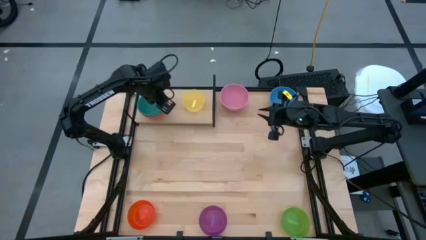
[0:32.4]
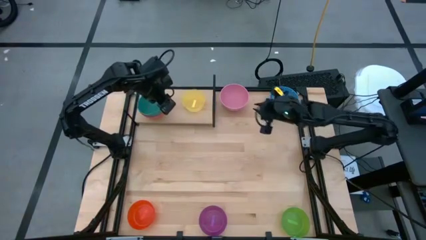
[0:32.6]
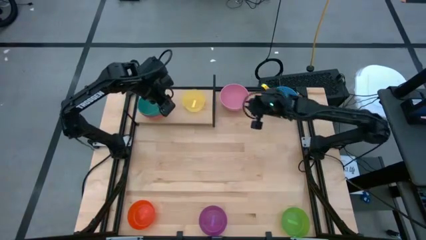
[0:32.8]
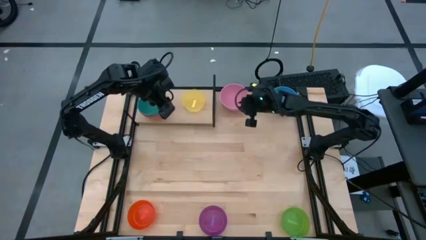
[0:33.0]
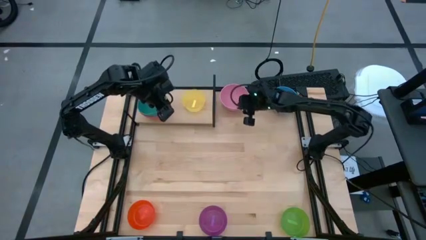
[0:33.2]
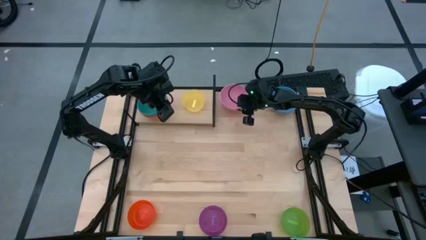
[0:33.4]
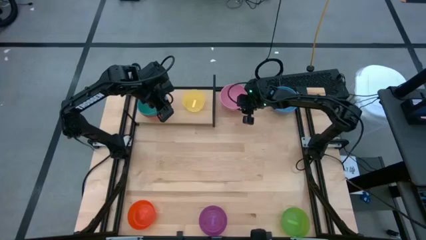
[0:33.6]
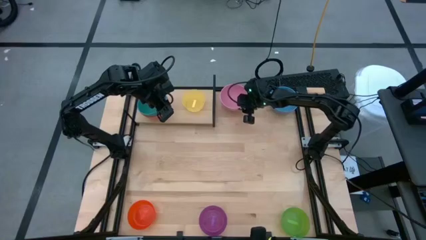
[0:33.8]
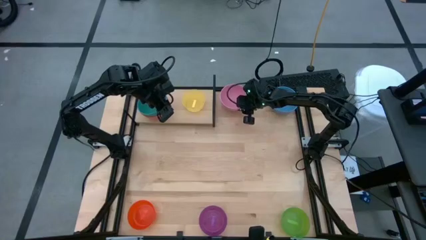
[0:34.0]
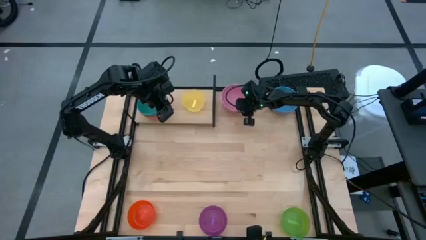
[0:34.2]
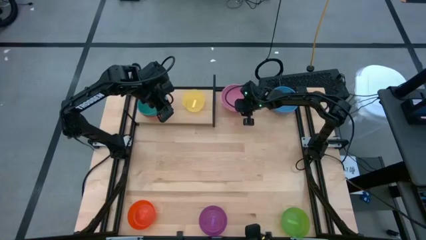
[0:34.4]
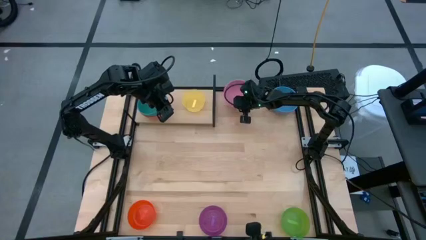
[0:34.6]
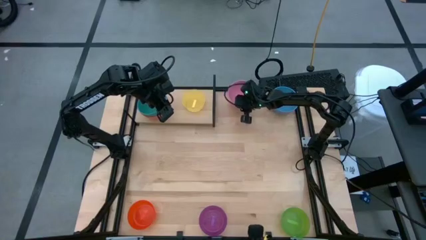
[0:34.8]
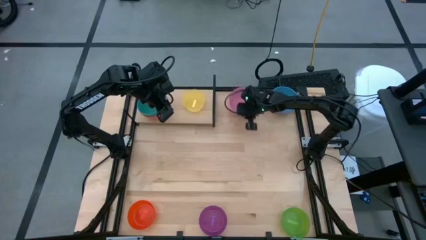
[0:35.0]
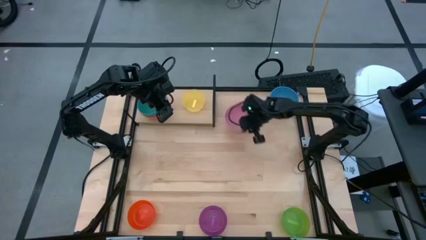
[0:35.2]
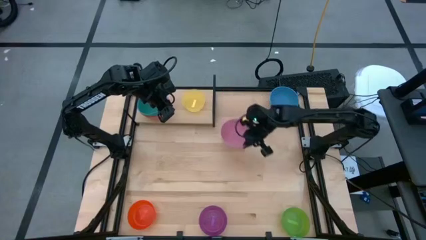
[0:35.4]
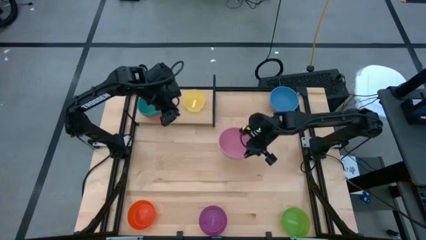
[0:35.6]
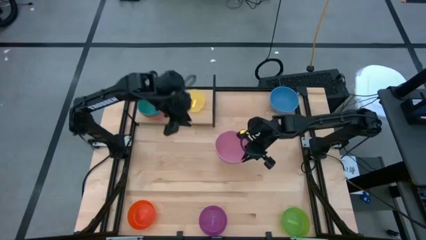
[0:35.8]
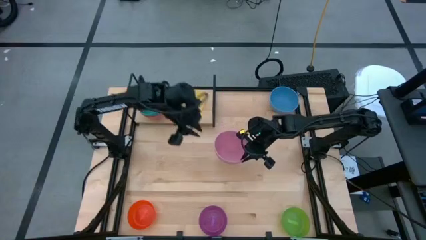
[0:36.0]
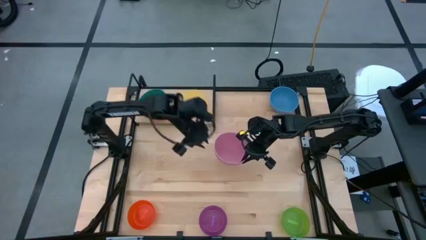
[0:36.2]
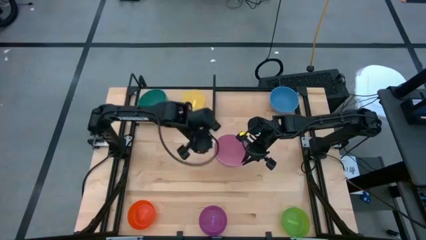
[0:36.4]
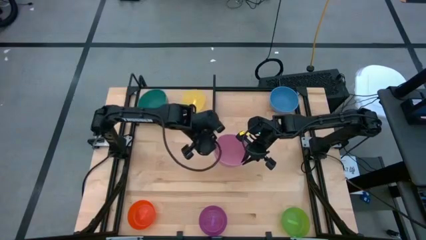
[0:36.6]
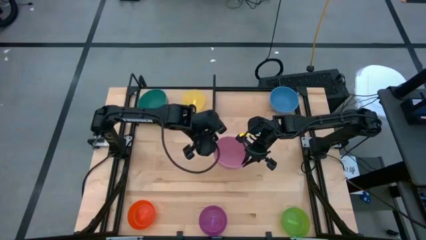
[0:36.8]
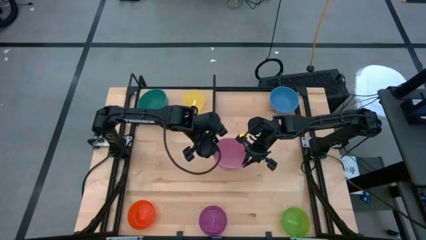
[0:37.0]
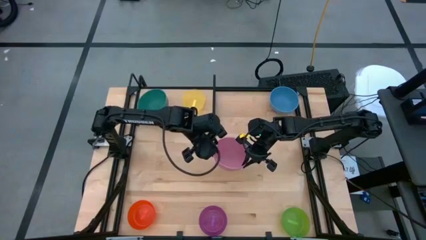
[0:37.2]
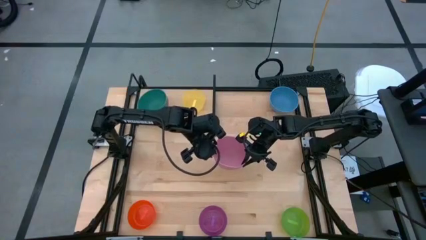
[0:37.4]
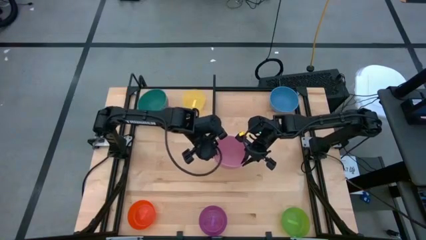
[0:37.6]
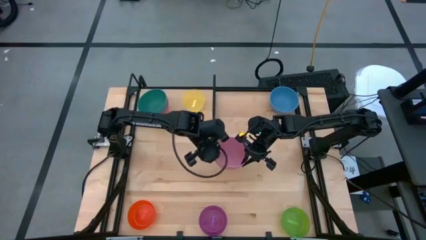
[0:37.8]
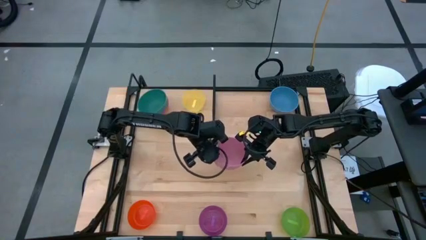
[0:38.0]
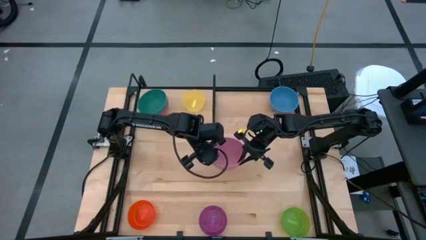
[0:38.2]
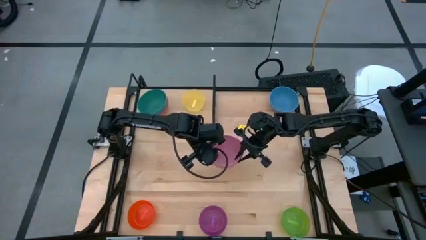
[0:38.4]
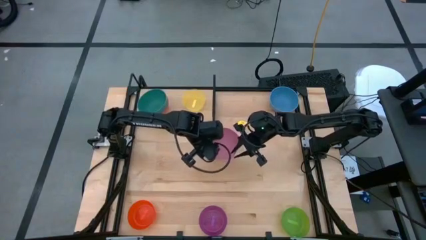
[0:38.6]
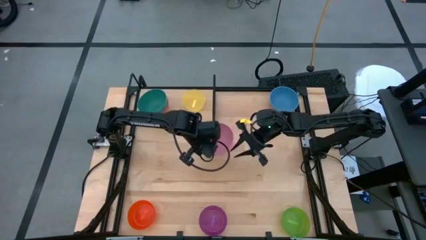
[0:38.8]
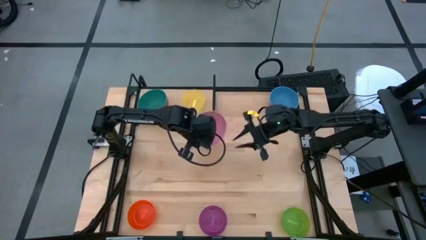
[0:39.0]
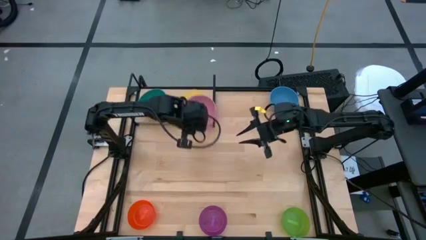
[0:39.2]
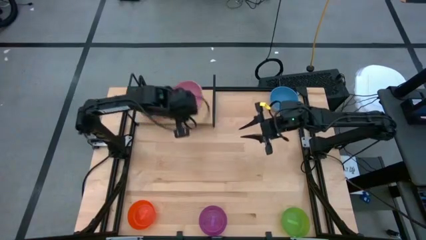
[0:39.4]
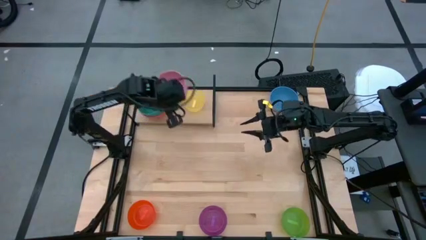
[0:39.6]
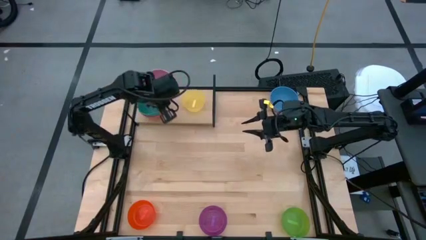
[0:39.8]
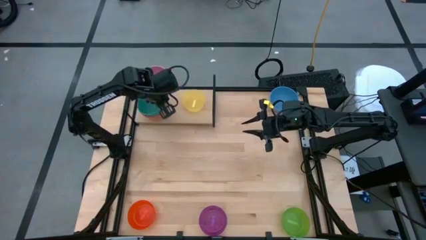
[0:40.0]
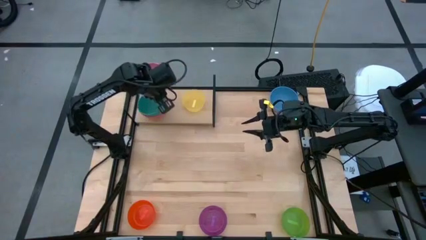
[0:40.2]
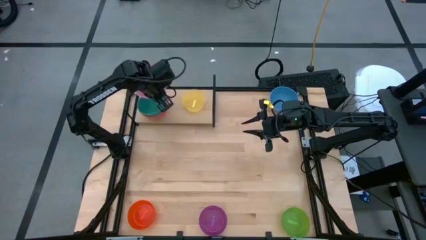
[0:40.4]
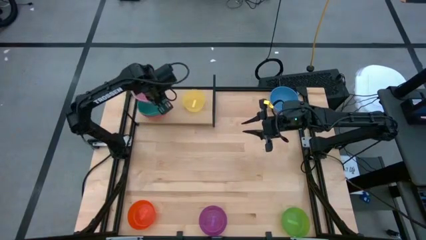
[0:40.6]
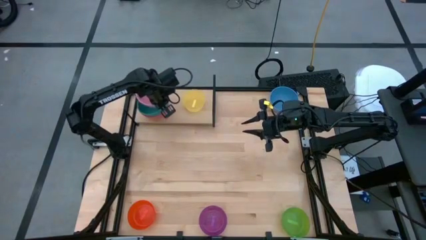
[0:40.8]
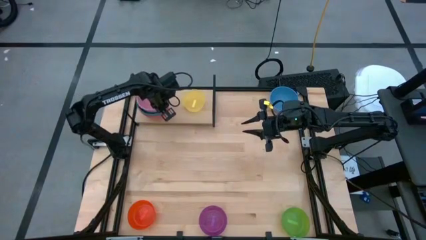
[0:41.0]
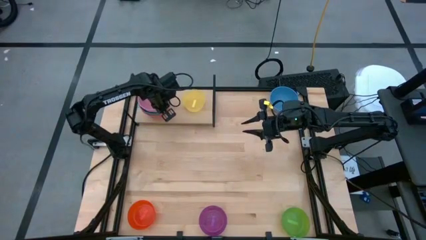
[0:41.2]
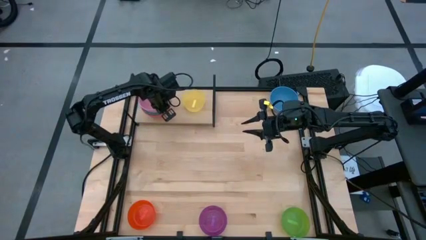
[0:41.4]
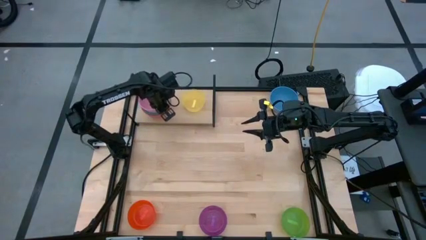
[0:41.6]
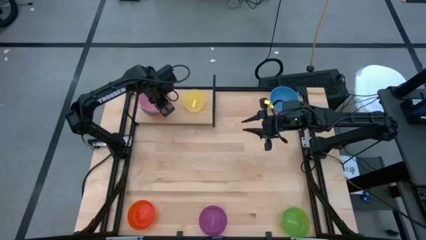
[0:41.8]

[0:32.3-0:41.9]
Task: Place and stack bowls onto a shelf
Stack the pink bowl on top of the dark green bowl on the shelf

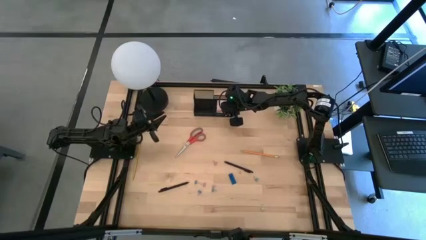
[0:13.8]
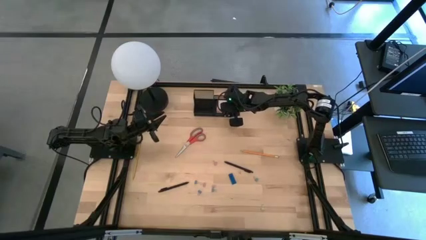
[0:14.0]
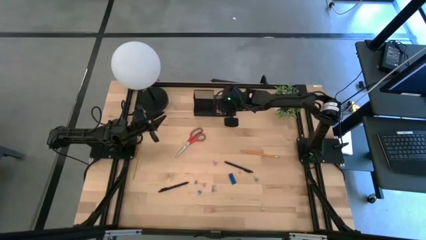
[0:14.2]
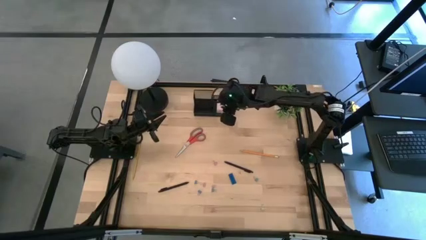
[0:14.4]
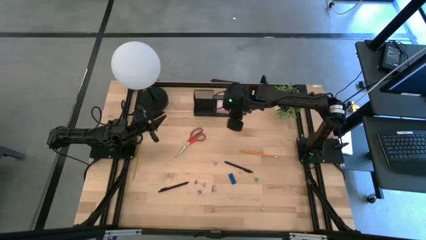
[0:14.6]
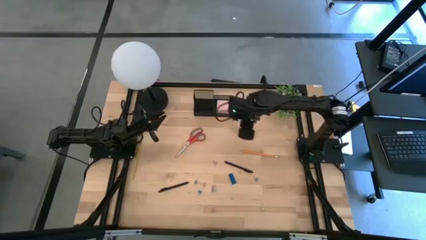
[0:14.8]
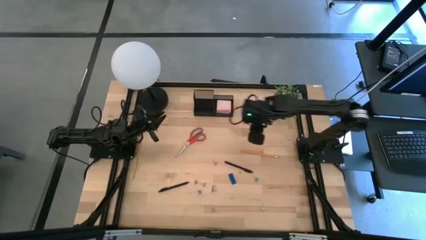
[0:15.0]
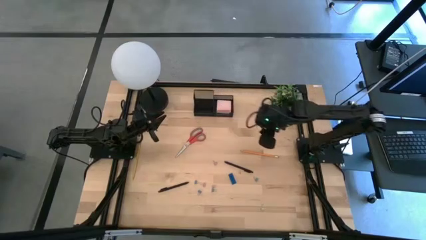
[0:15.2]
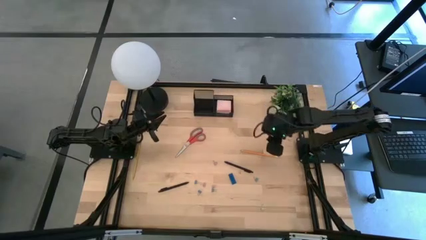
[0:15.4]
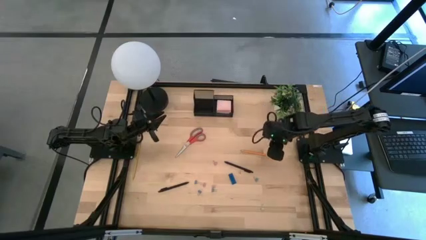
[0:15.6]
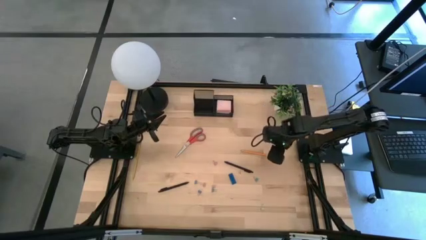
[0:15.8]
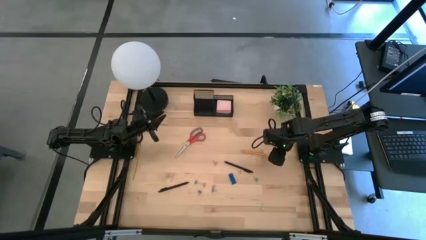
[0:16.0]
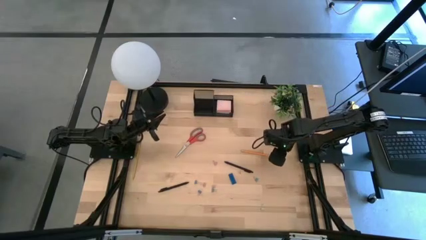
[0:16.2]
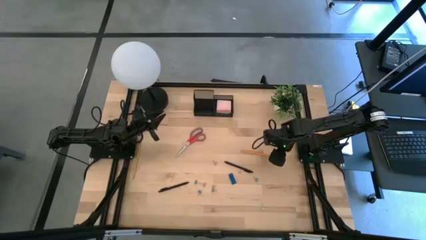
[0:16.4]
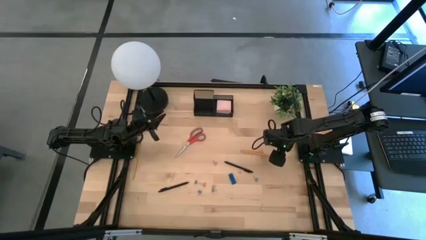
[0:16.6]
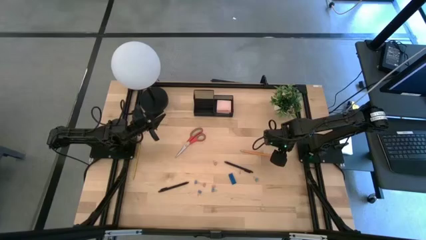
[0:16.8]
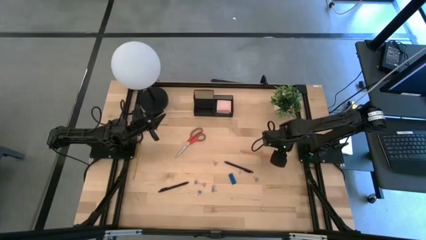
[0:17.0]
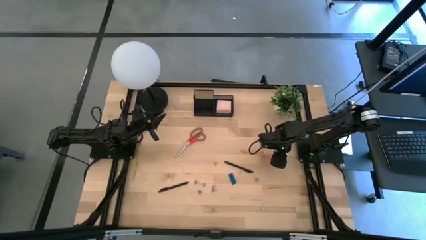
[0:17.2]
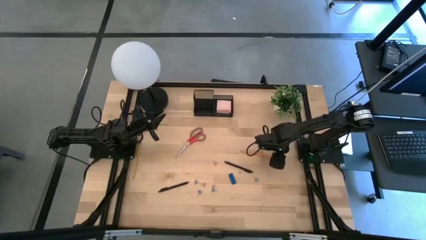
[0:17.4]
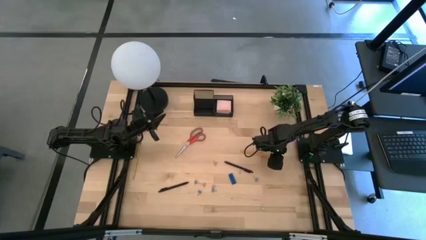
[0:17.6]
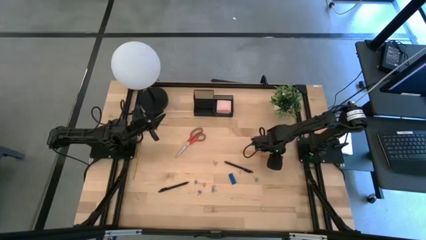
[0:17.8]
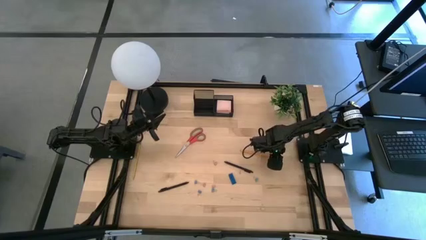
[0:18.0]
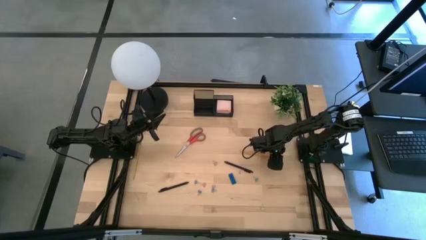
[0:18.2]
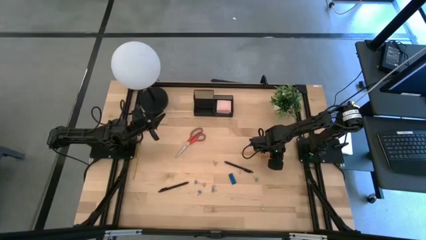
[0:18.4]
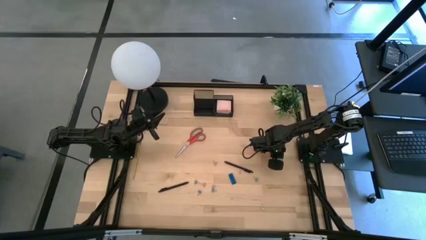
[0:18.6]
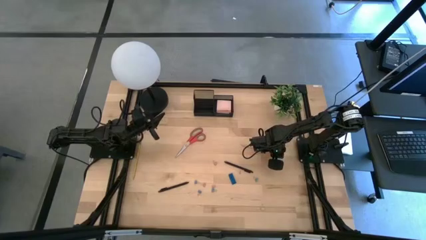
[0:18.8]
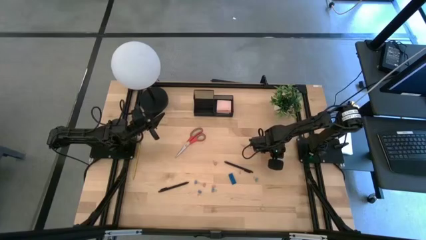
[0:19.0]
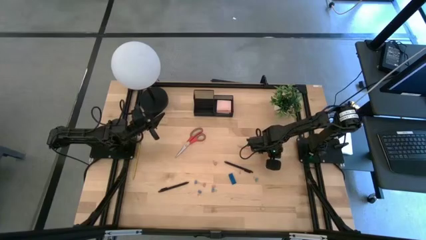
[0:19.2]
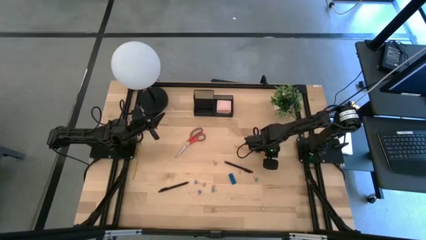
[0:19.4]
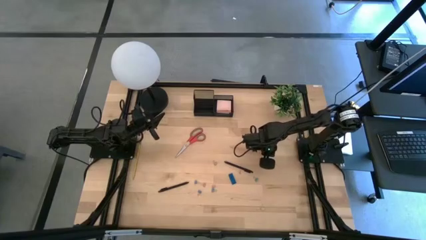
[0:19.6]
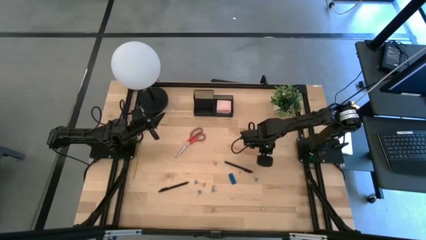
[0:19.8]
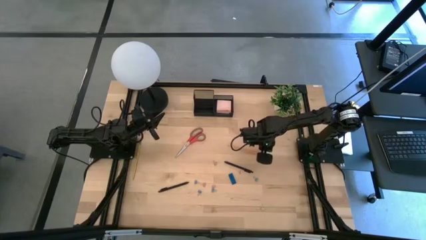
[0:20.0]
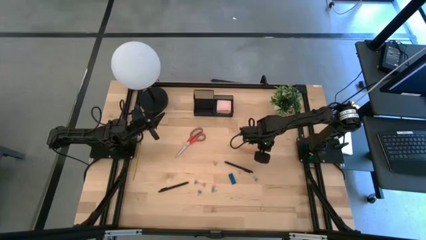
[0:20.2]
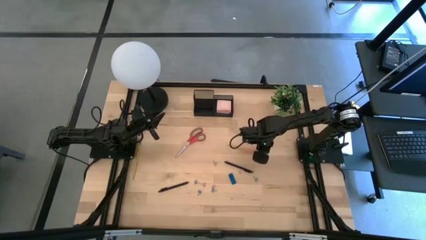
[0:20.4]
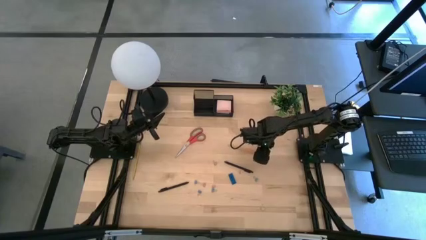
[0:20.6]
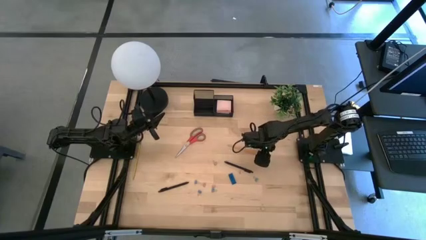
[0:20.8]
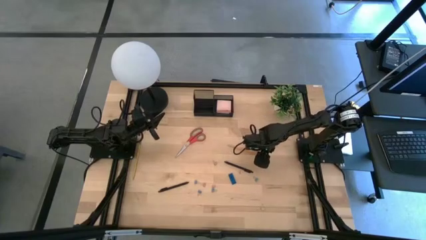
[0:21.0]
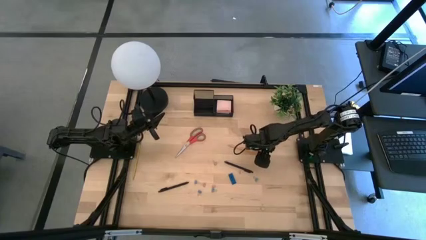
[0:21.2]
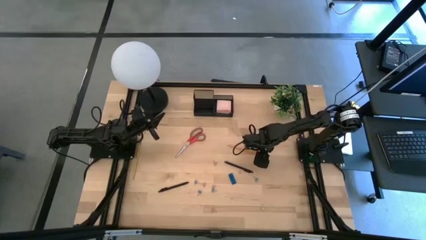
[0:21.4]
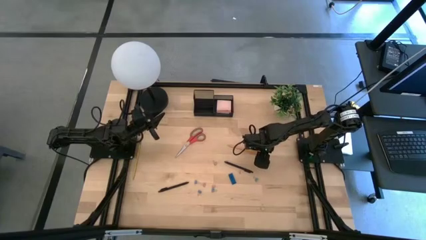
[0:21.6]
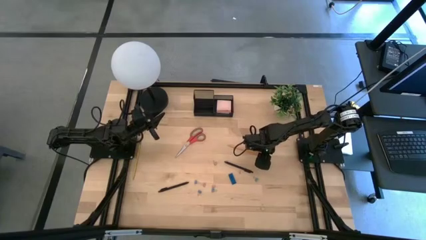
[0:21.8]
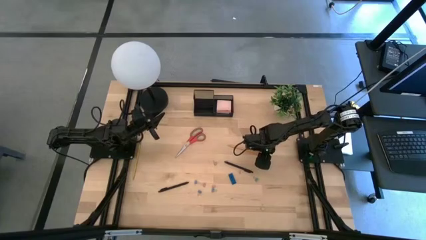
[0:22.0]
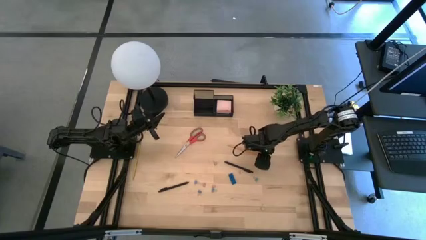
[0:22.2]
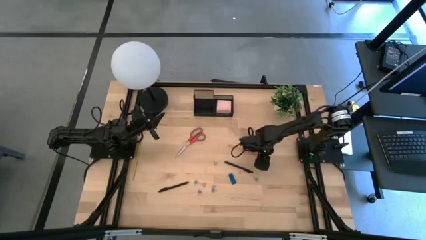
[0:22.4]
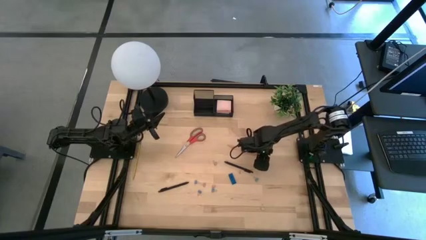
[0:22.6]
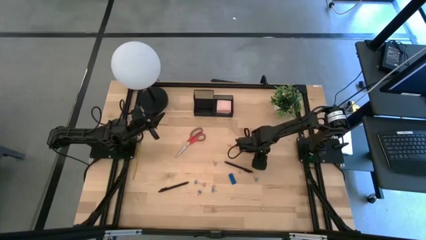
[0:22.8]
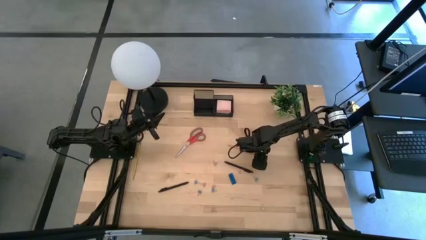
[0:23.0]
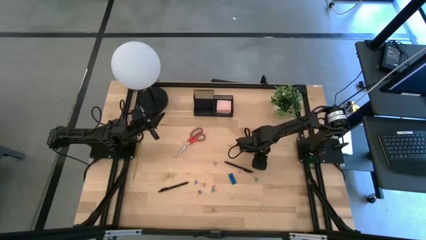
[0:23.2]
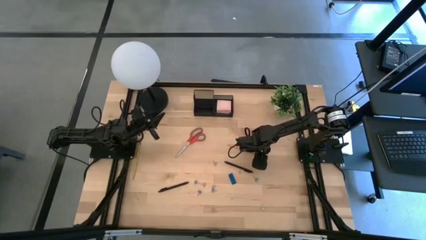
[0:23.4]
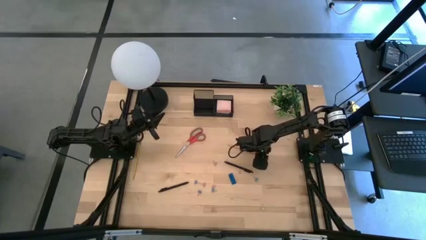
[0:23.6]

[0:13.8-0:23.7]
Task: Pick and place office supplies into organizer
Put the orange pencil into the black desk organizer
